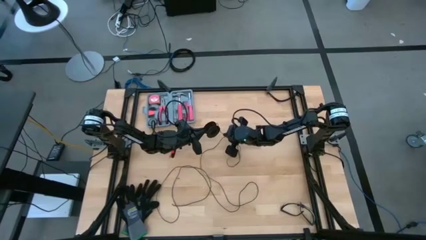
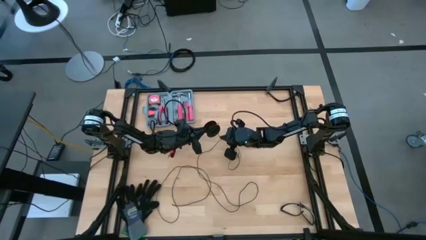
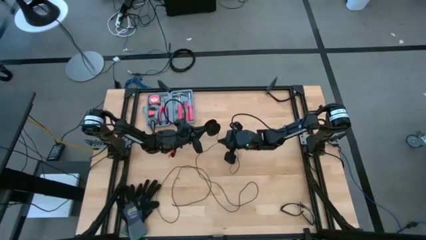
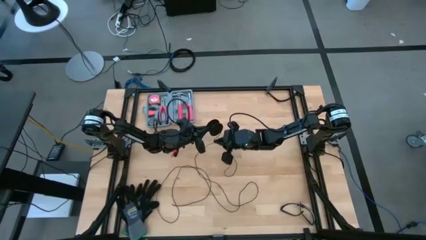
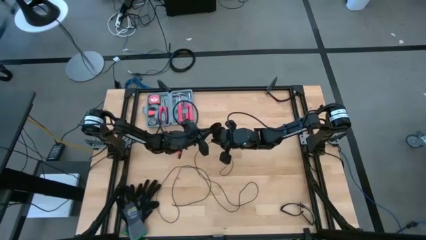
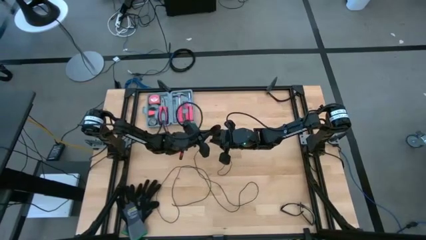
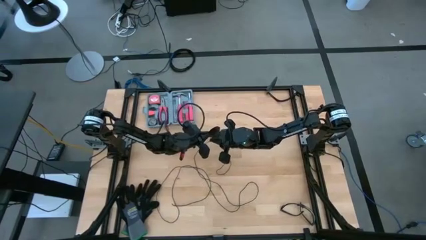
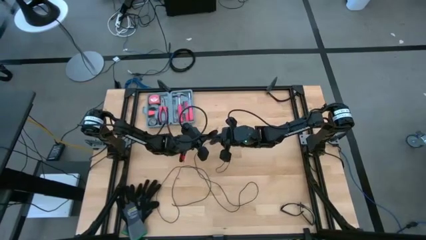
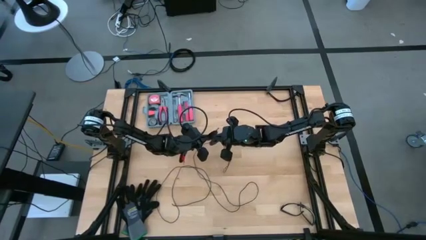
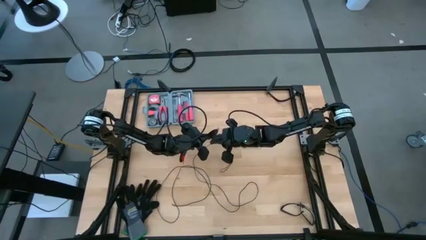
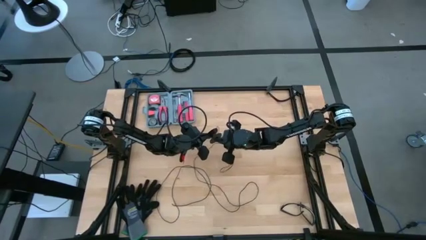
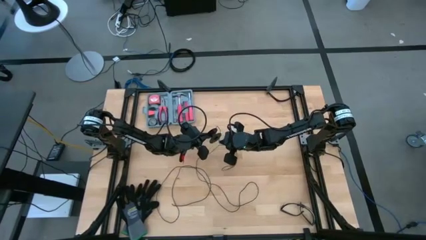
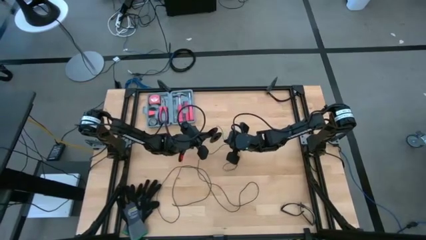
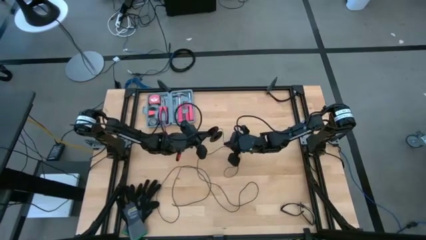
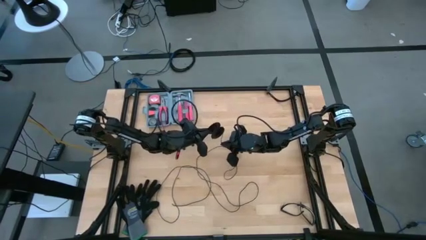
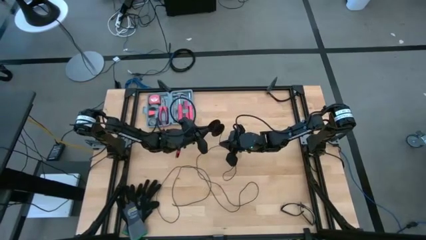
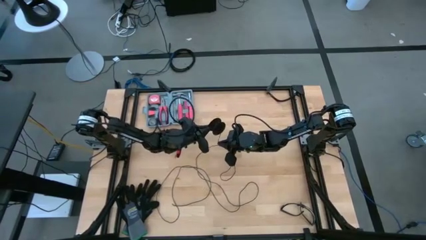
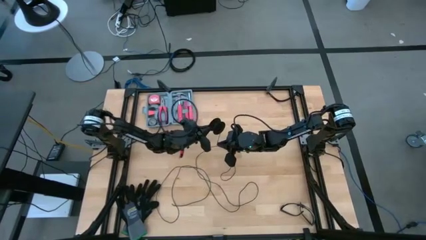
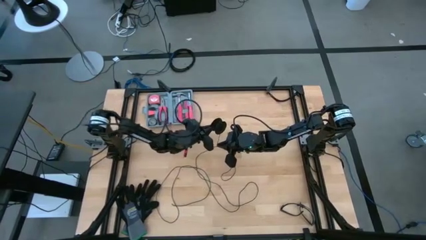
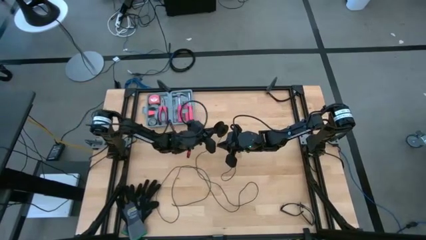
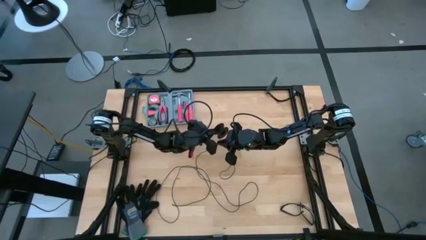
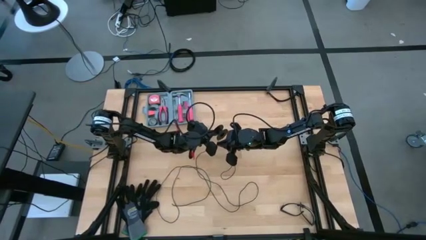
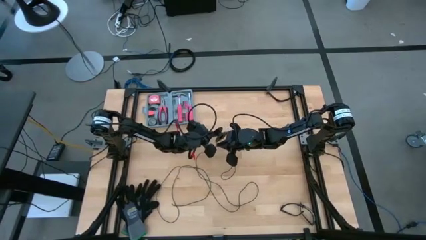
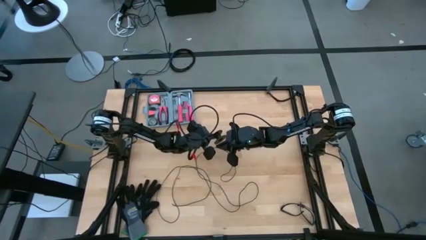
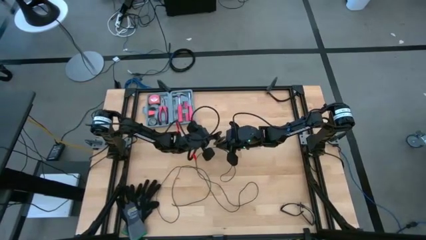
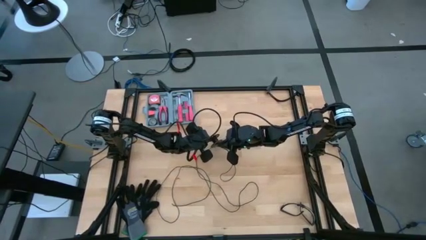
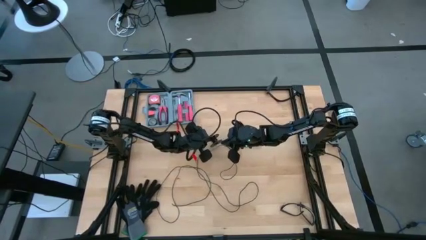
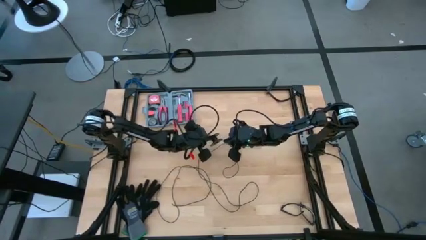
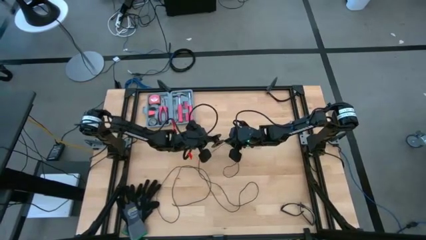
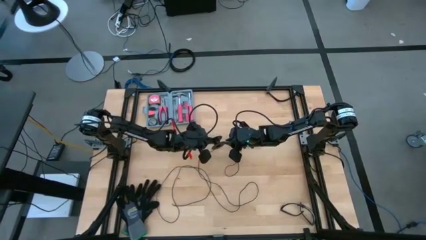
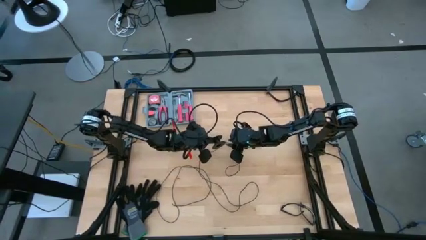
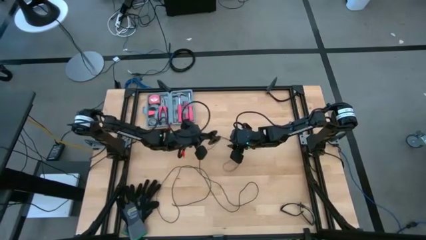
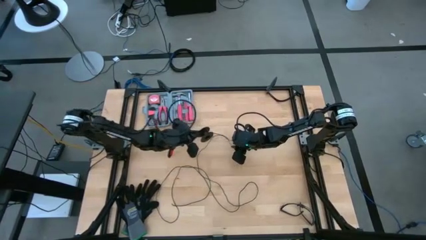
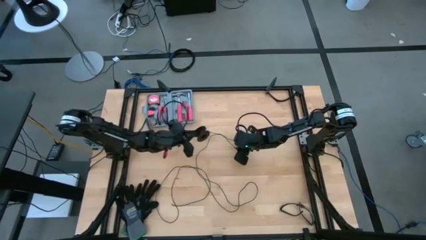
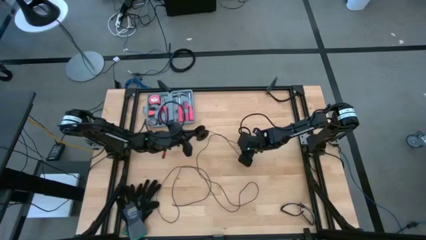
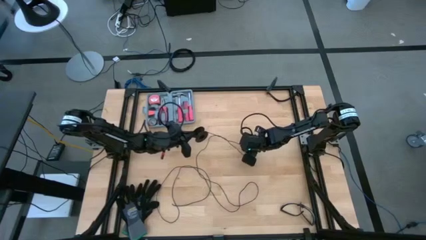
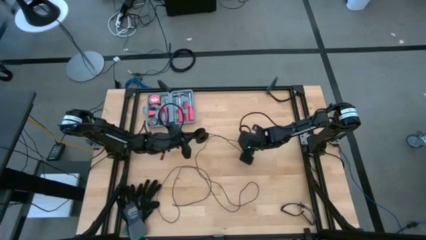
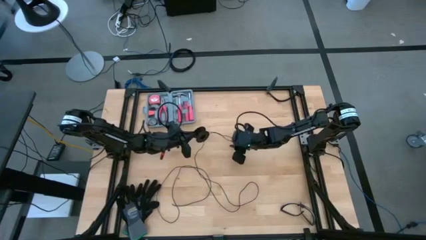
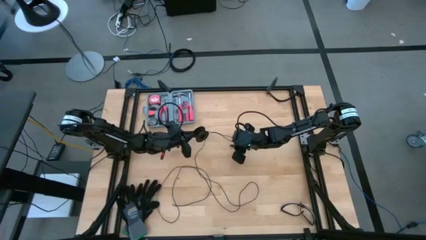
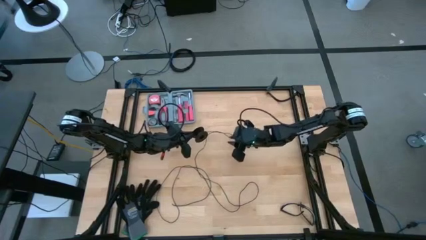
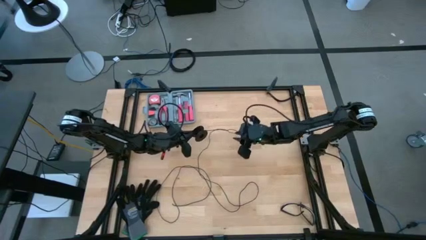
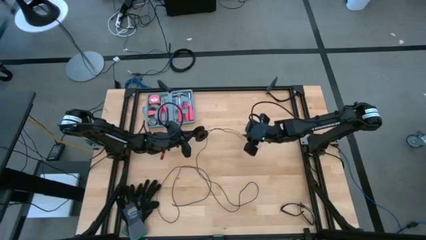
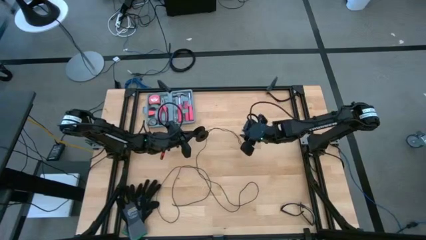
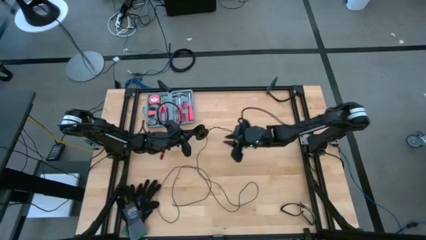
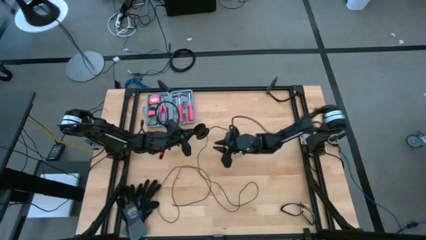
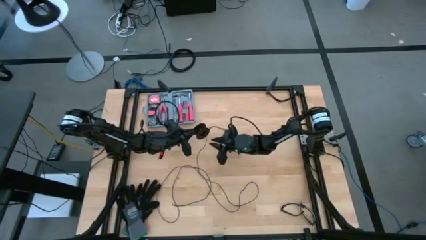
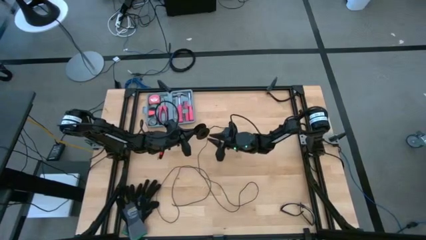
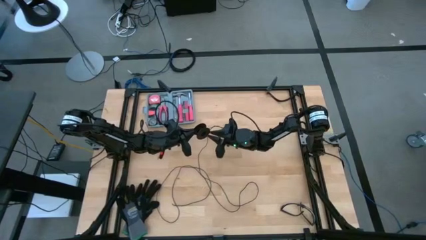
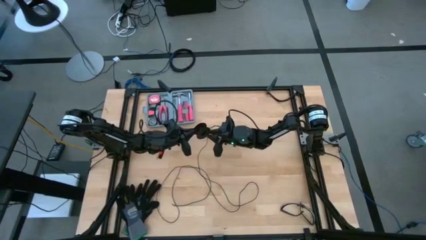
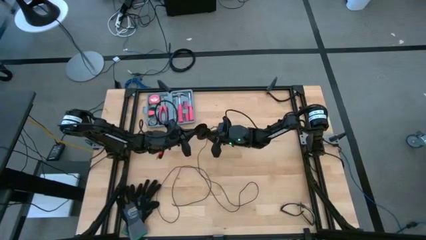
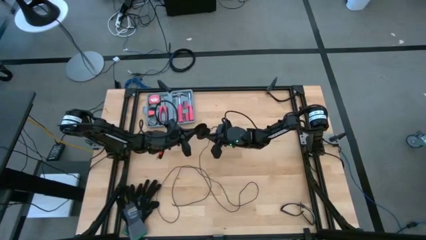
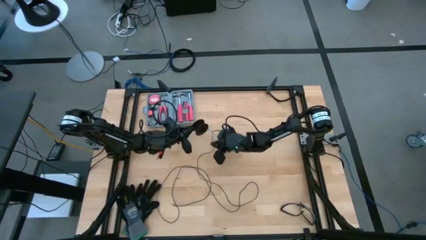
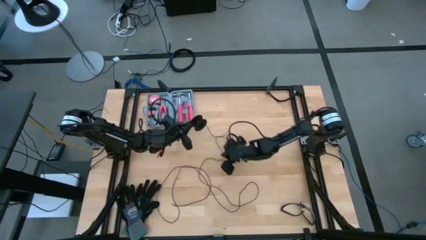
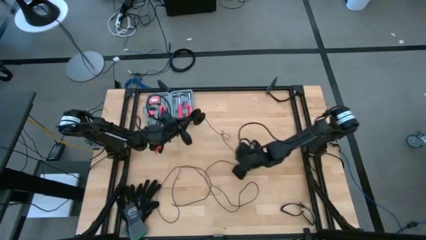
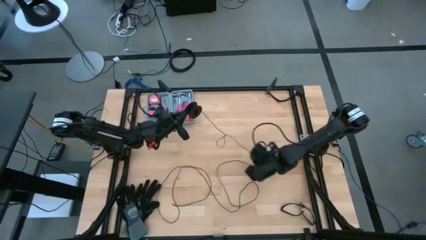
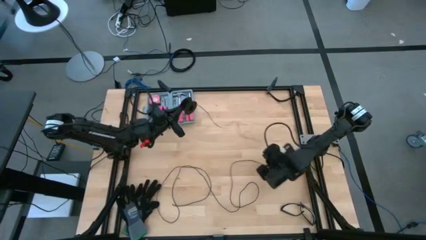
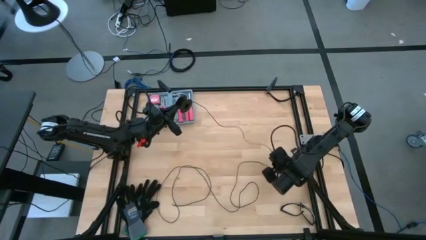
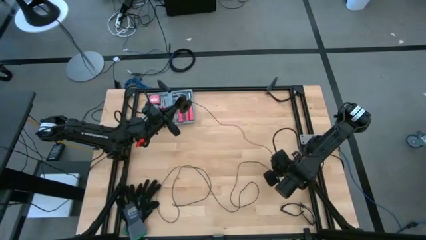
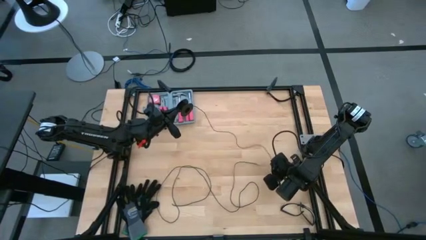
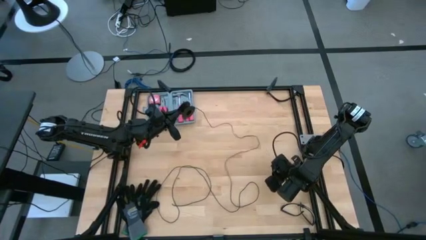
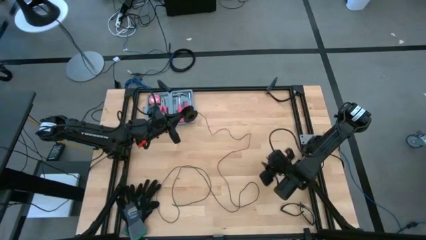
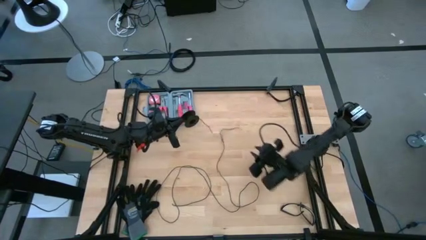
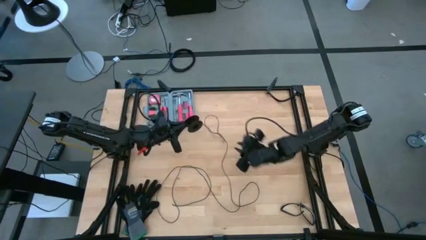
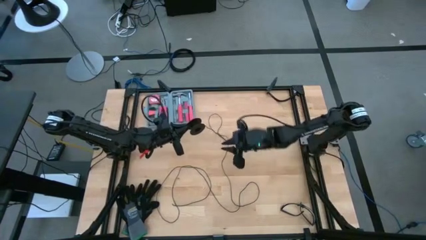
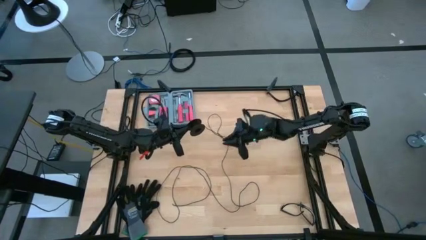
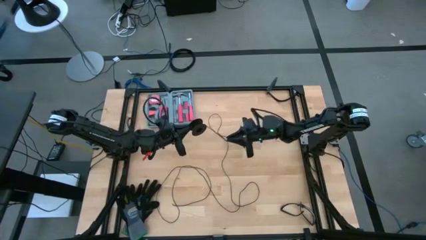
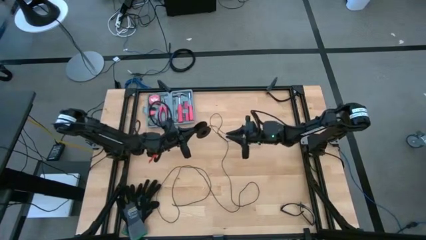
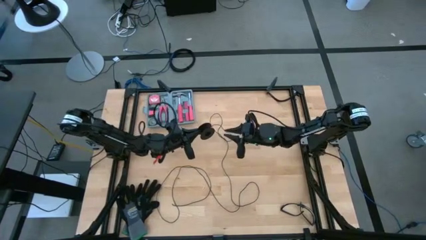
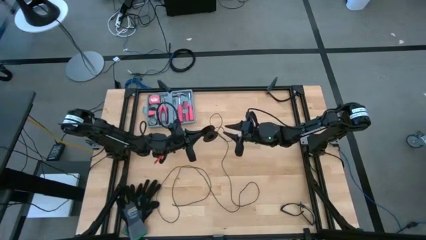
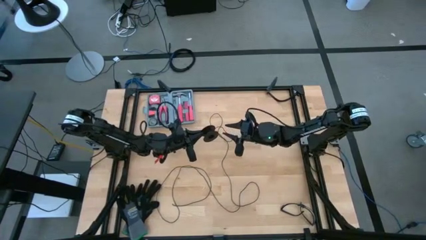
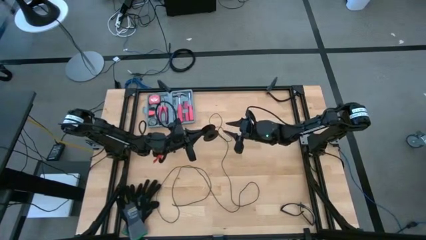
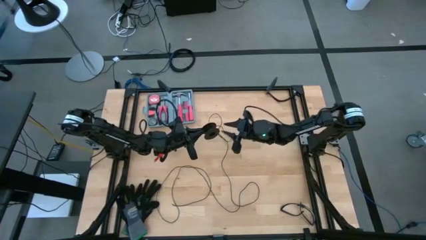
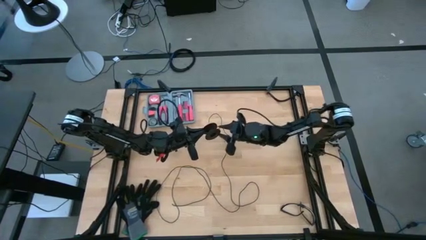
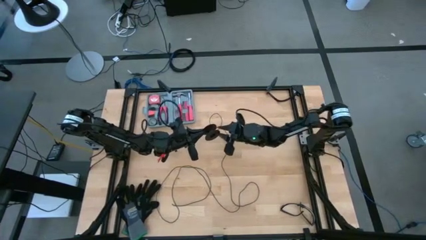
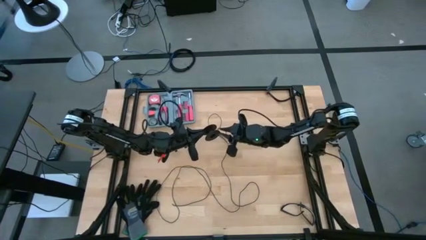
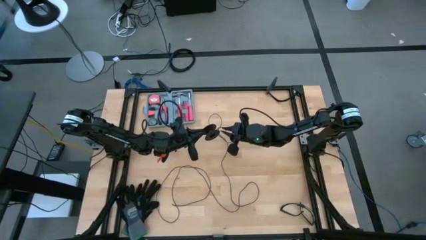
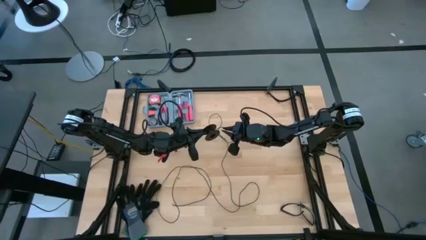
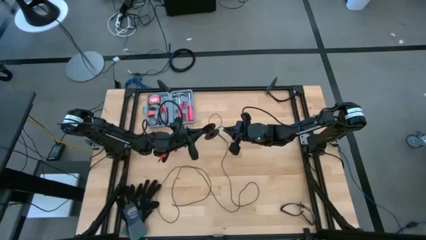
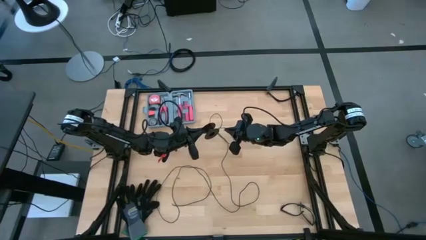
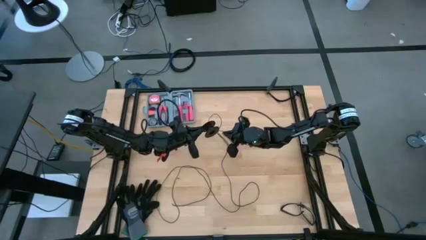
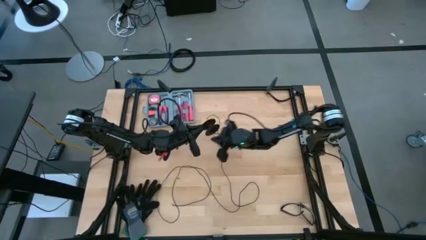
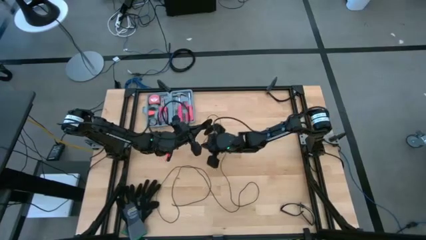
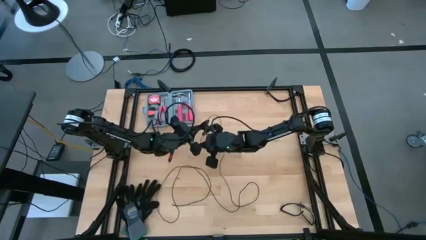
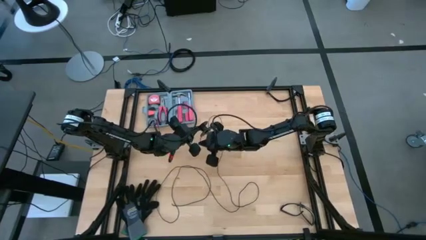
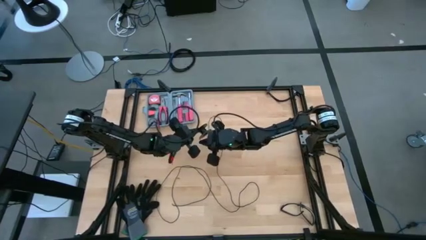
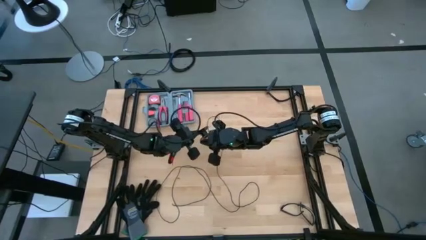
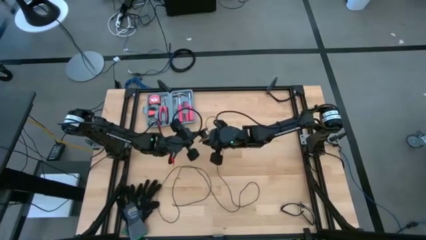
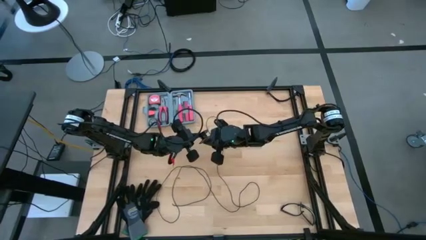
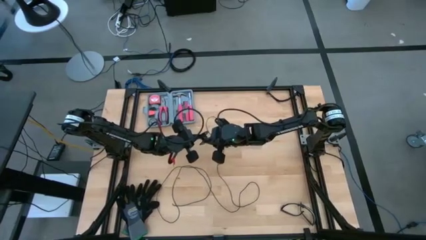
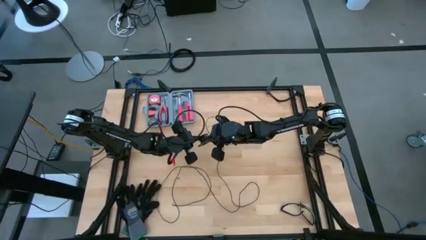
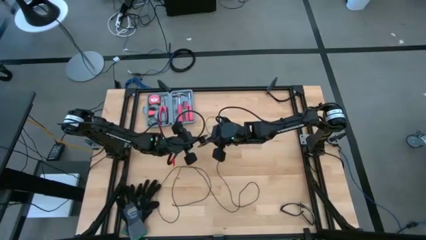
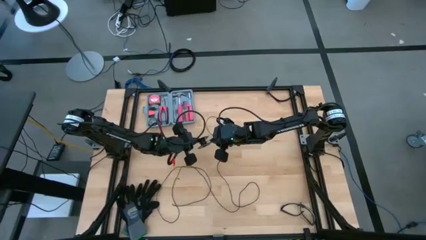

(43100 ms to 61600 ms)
Task: Coil cords
Coil the black wire onto the spool
